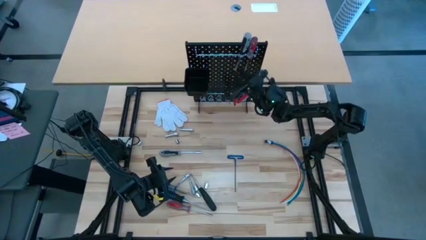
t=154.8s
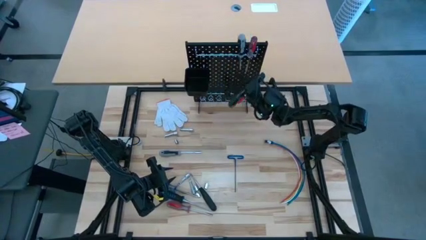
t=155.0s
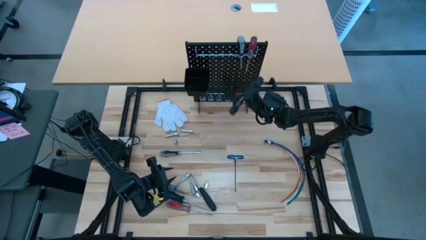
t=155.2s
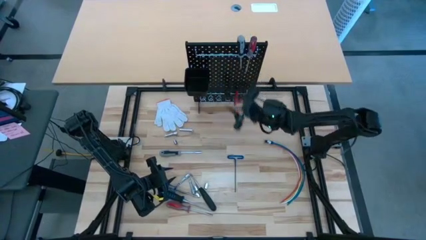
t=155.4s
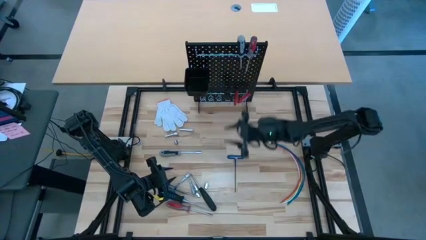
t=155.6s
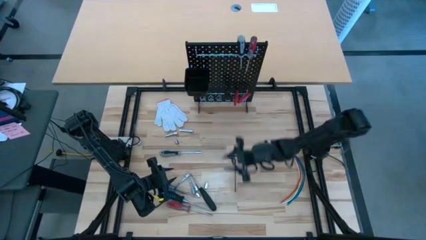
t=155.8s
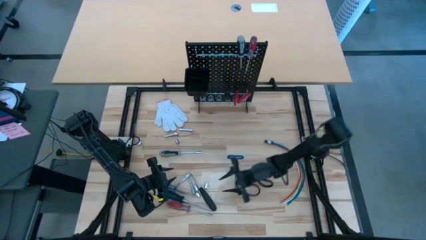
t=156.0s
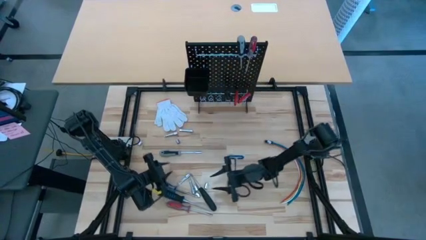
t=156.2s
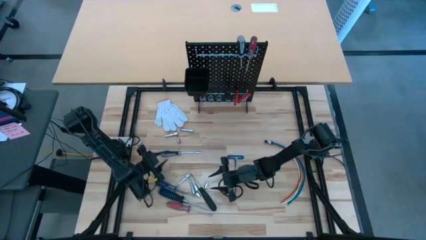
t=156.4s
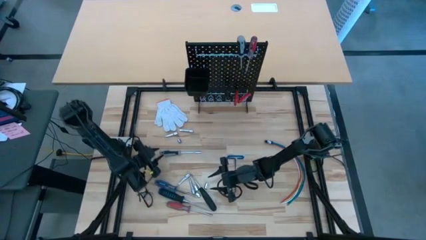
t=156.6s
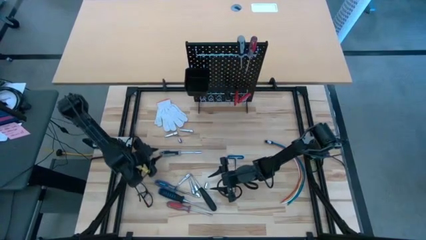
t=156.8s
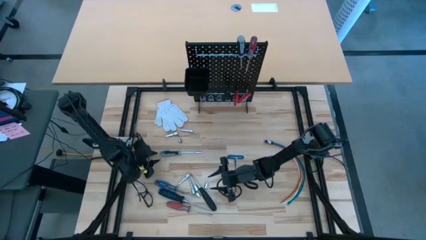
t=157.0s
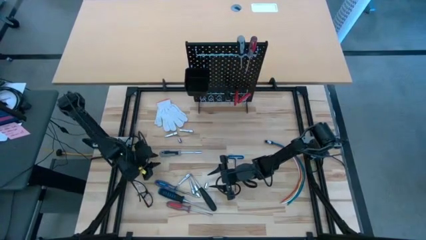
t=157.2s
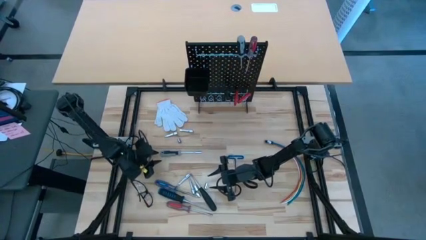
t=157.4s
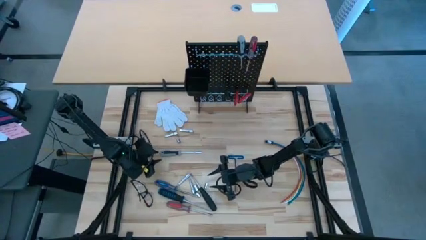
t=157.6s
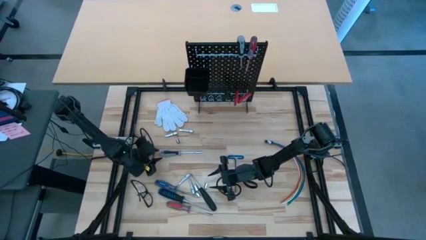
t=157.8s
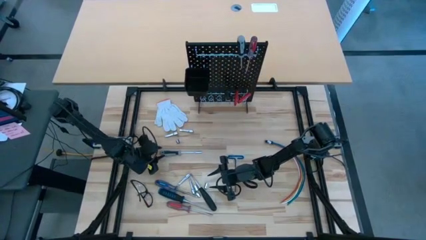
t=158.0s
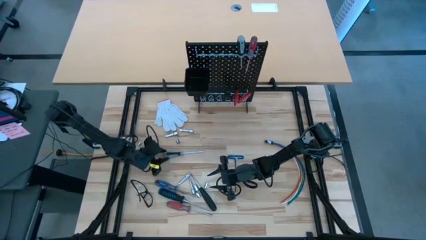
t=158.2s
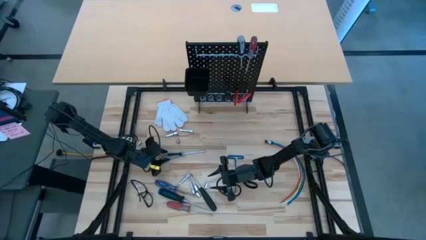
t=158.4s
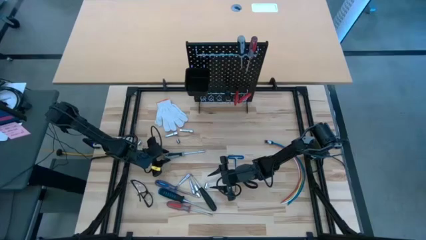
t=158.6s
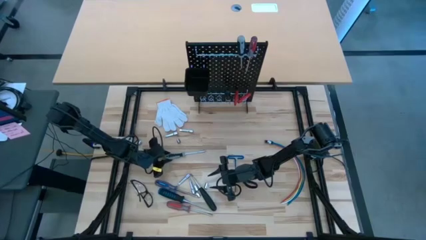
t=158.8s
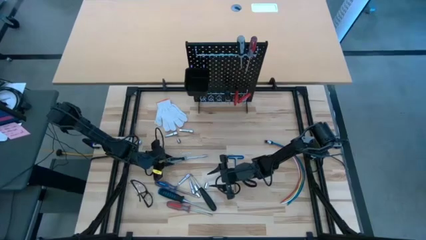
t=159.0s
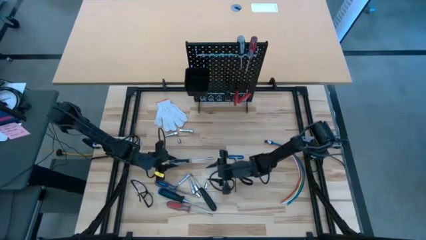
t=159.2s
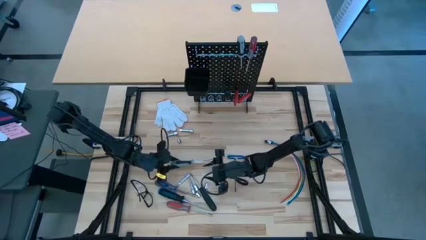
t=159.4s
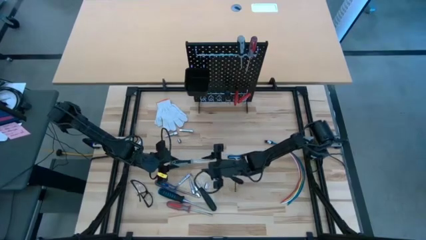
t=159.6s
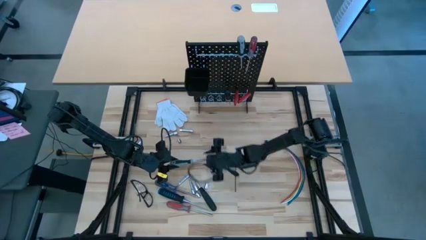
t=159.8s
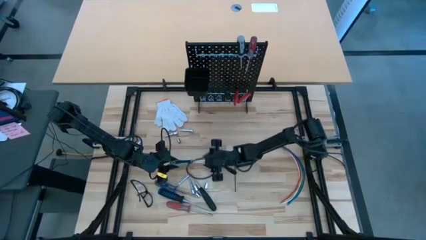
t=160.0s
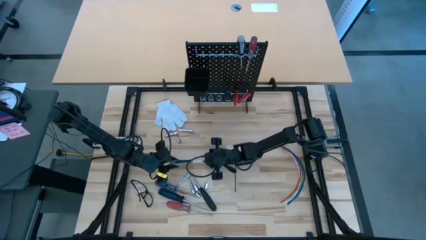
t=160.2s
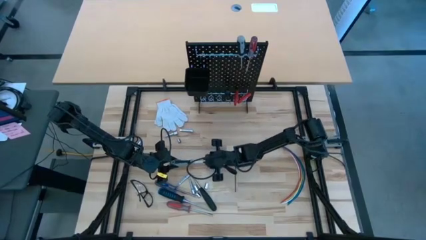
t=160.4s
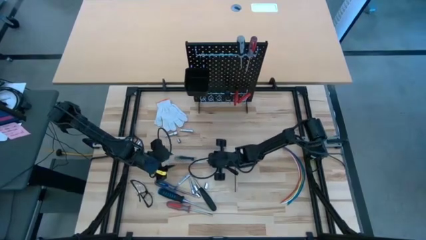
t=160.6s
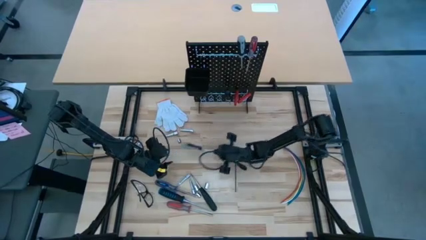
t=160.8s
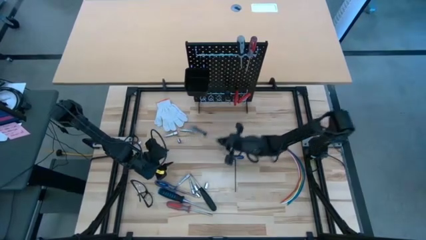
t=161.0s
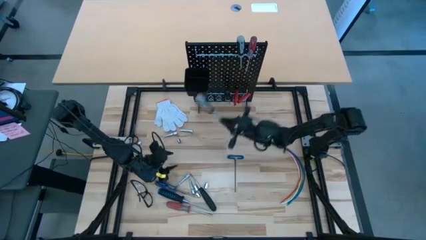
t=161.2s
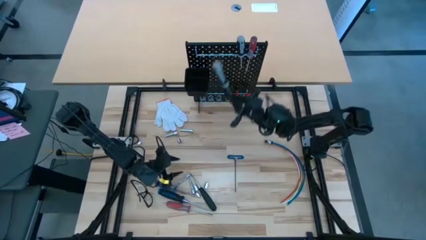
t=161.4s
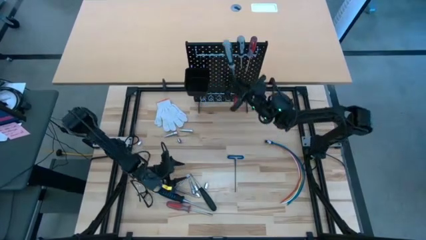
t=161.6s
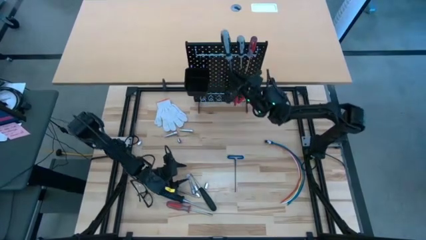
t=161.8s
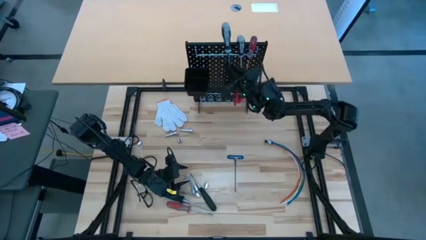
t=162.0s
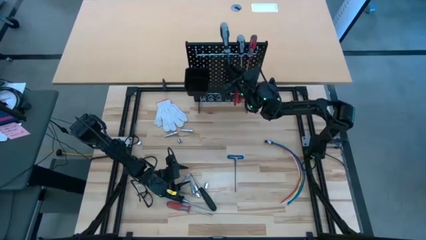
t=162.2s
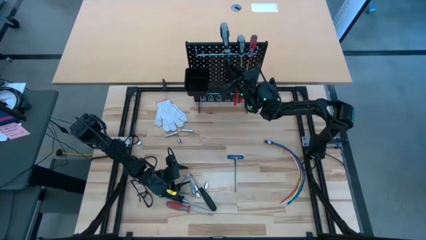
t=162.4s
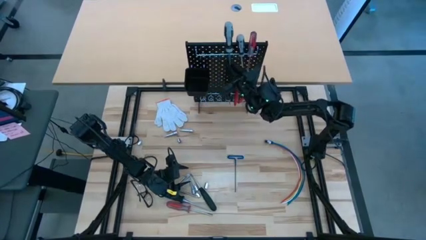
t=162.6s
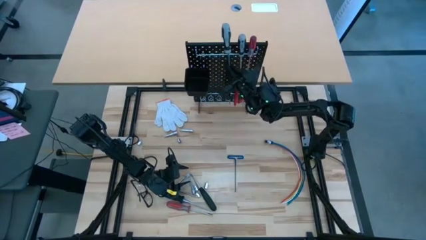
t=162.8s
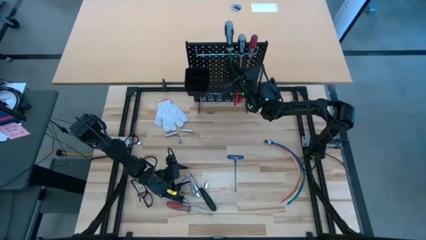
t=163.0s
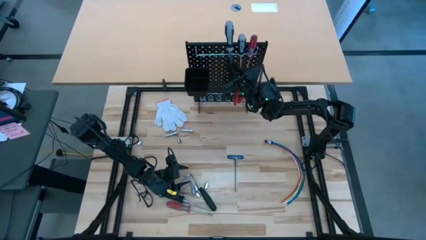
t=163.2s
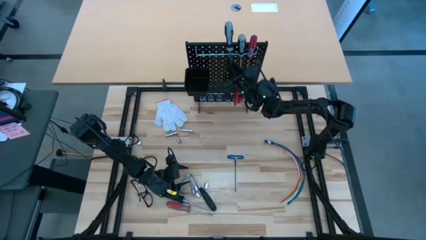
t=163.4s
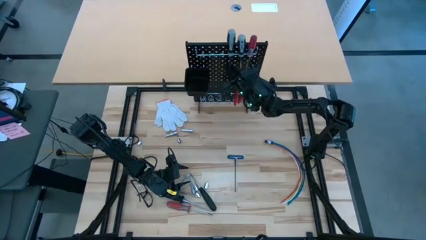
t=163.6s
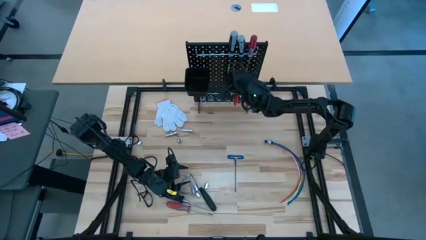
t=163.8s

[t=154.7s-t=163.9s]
Task: Hang tools onto peg board
Hang the grey nut driver on the pegboard bin

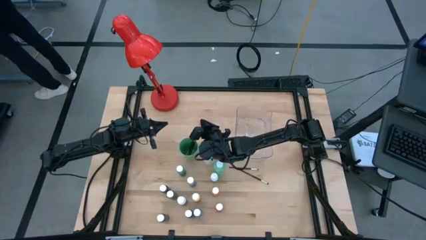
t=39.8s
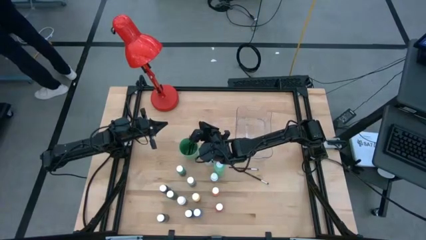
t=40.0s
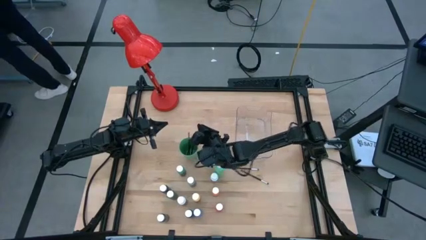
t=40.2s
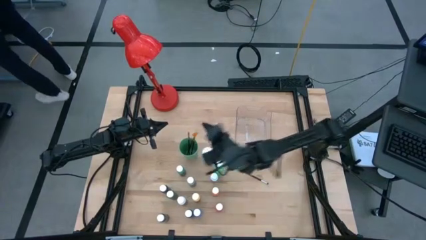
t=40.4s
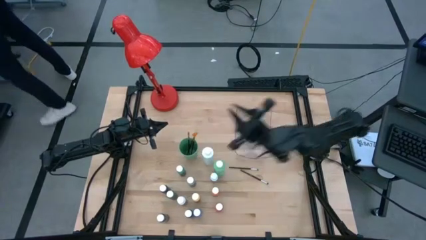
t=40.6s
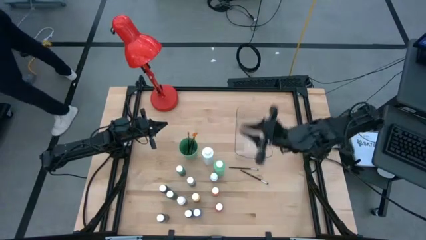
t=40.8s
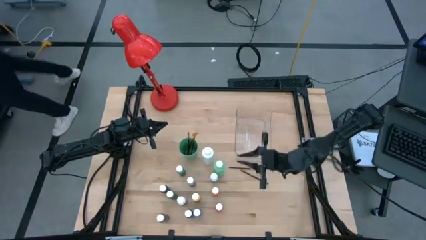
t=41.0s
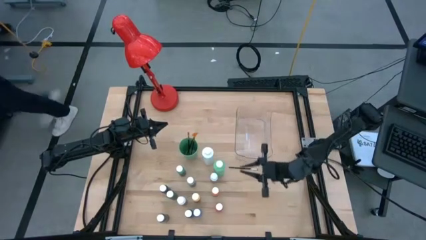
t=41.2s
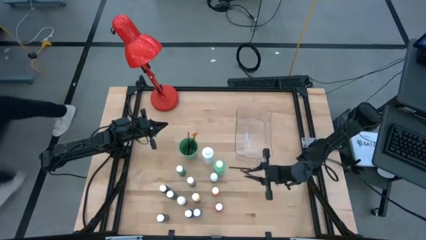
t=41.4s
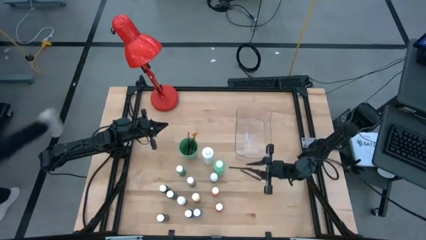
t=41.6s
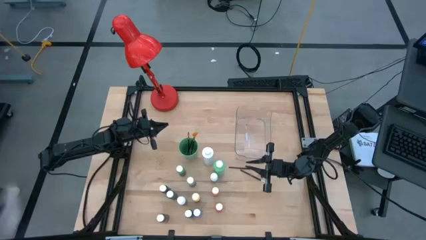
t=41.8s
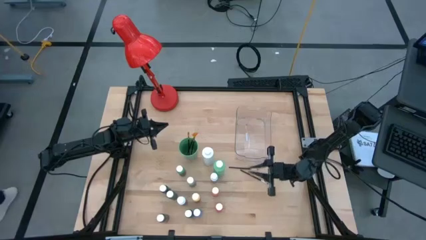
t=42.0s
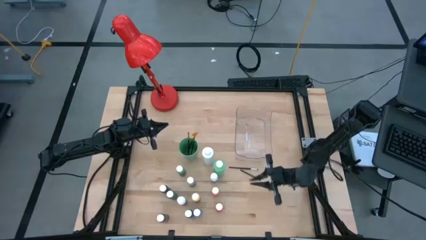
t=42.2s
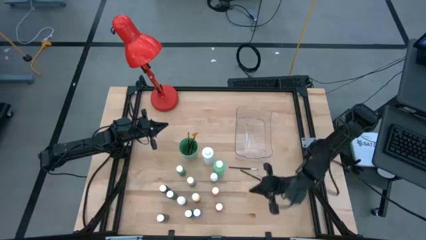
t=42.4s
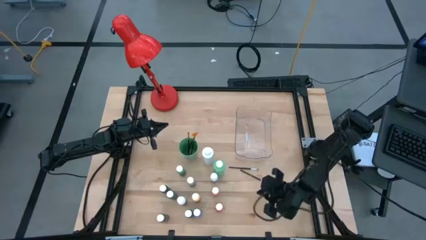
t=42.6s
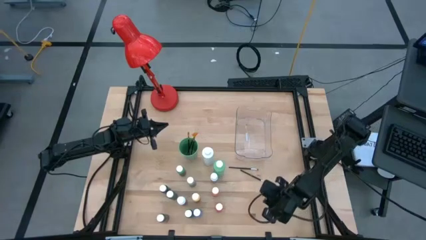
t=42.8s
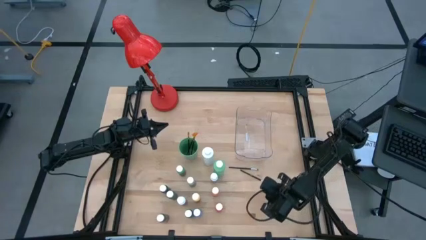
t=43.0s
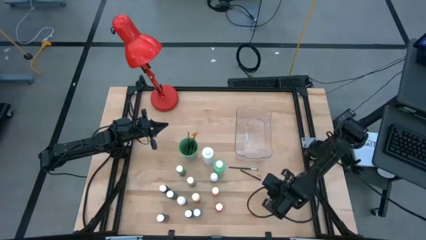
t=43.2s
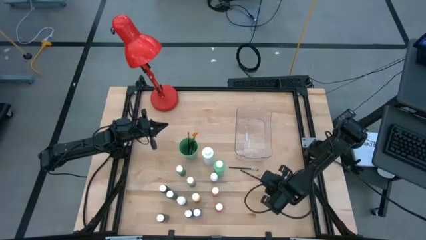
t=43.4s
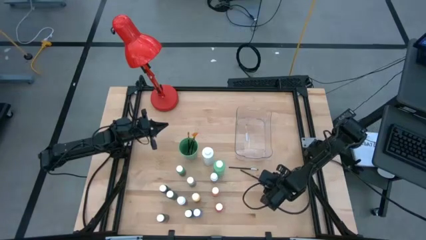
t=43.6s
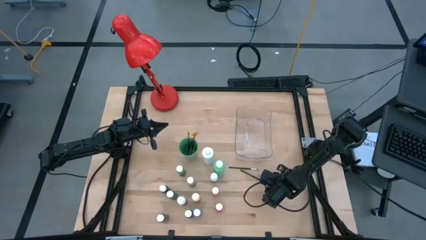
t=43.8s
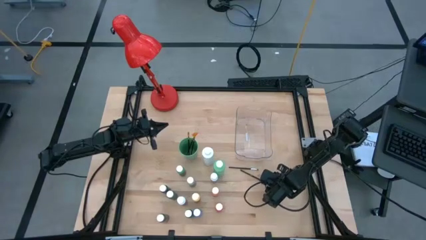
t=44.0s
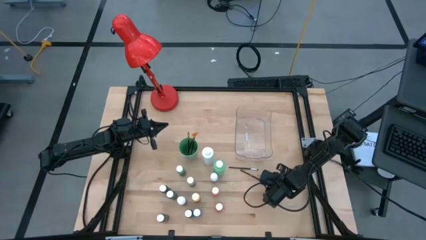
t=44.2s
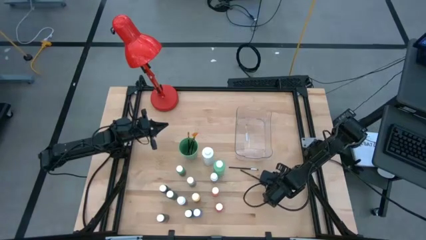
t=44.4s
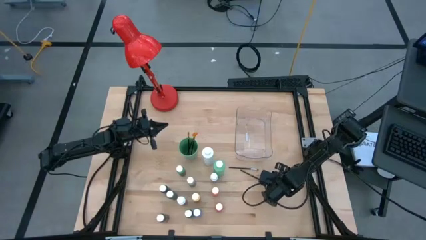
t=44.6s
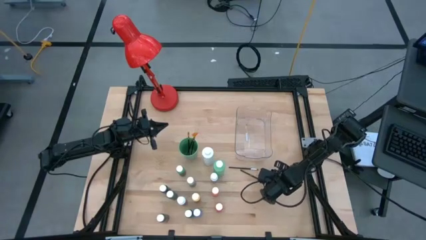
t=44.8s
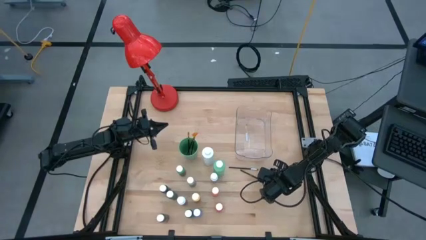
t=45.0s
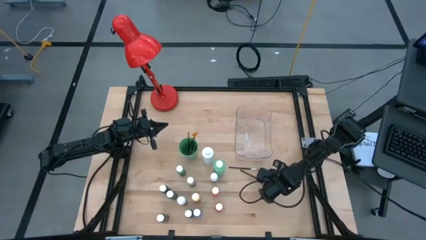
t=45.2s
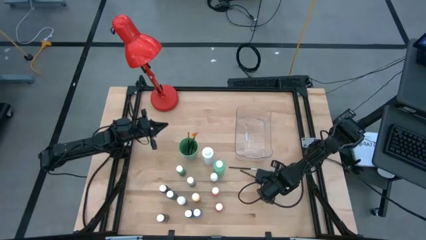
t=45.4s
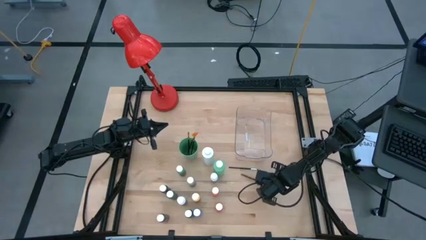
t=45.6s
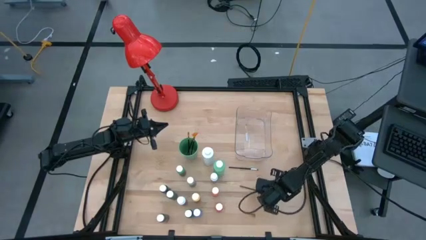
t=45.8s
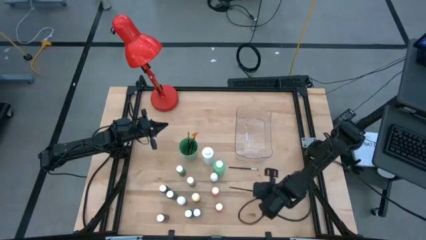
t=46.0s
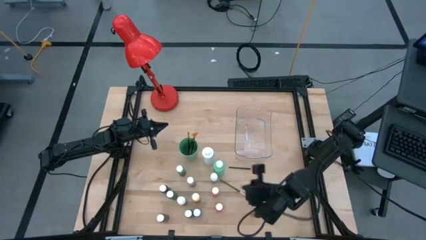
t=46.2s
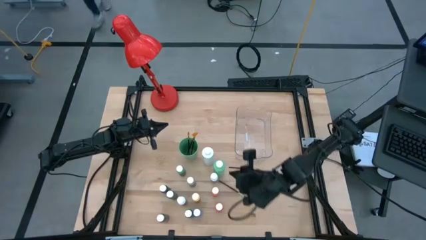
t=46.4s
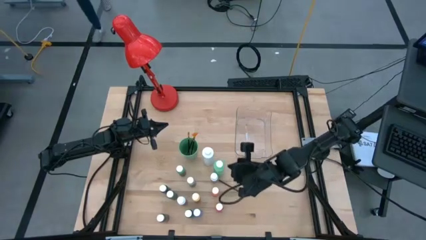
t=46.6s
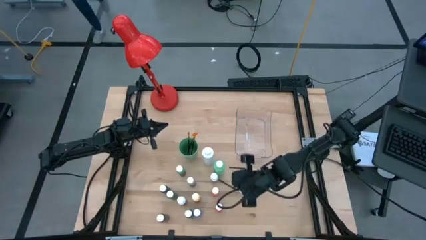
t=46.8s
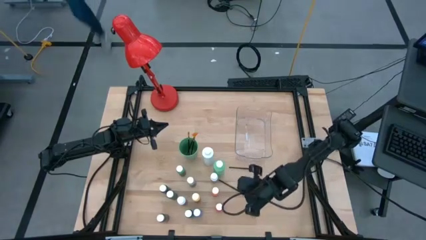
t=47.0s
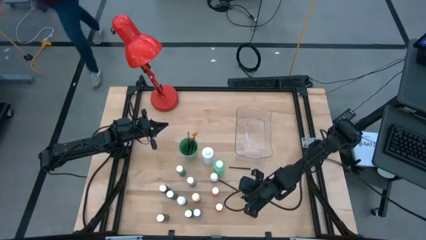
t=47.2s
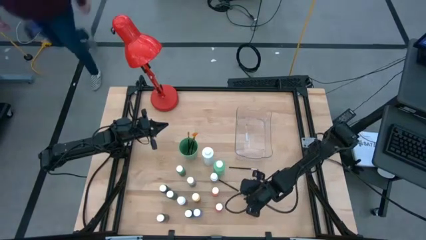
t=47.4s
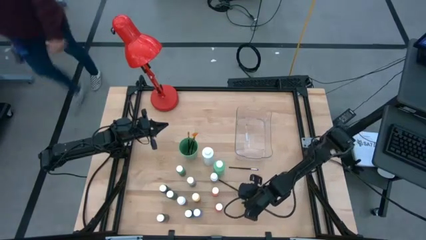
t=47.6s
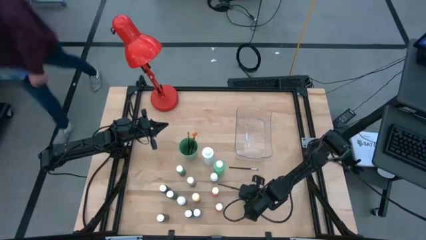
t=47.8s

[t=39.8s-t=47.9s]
Task: Pick & Place Paint Supplies
Put the bottom silver paintbrush into the green cup
